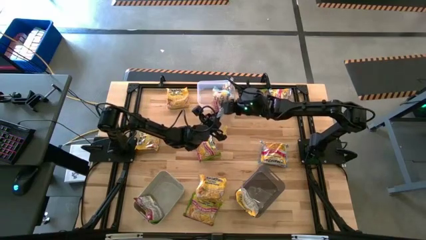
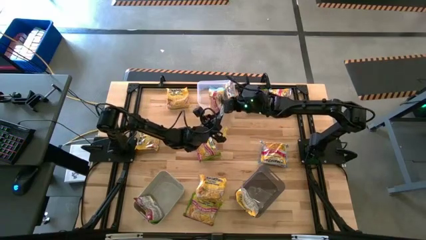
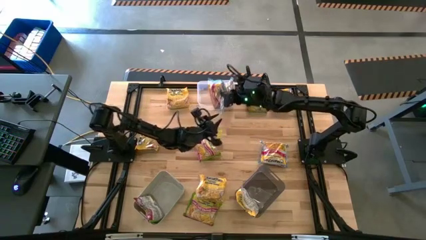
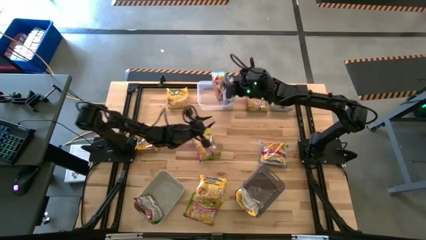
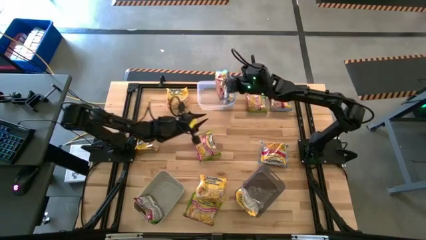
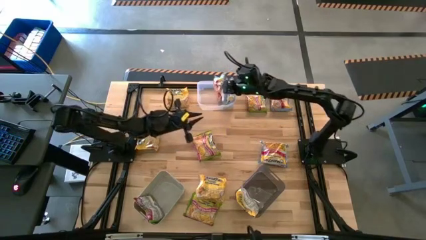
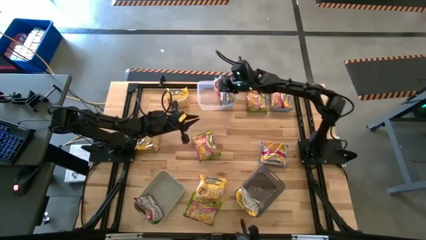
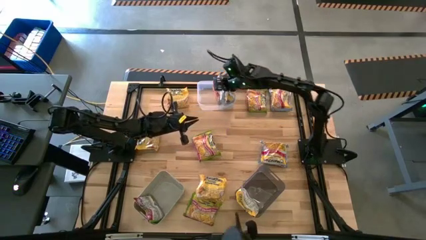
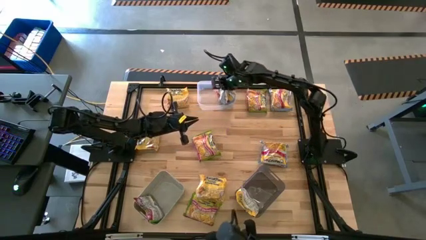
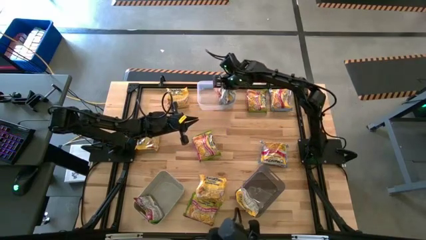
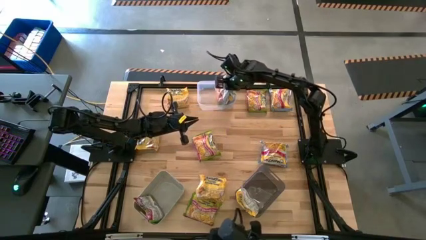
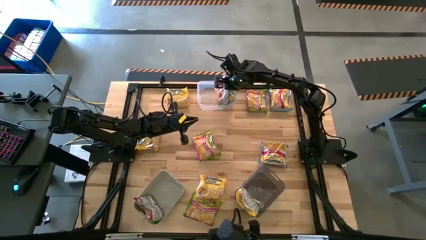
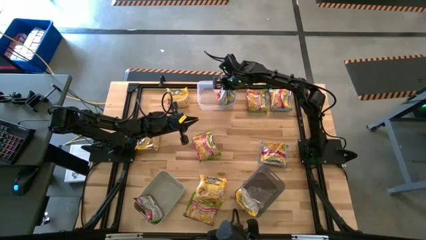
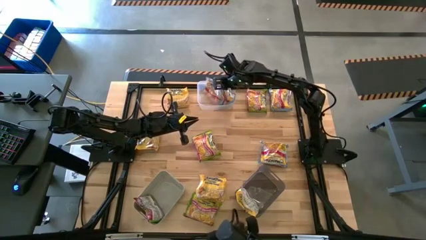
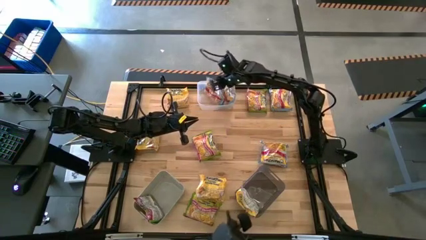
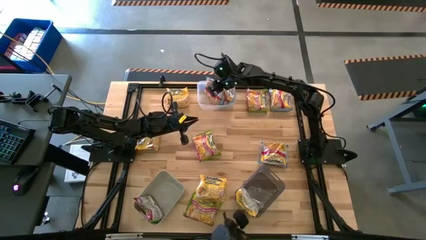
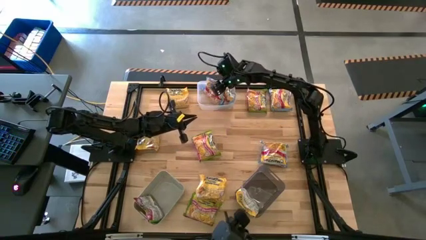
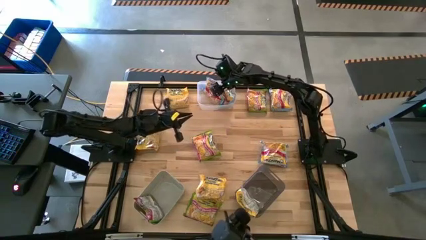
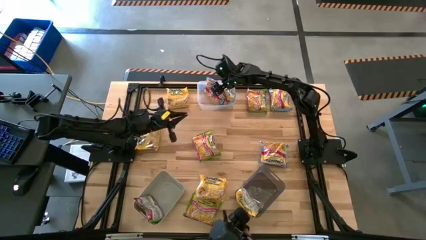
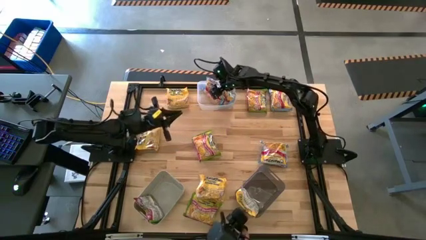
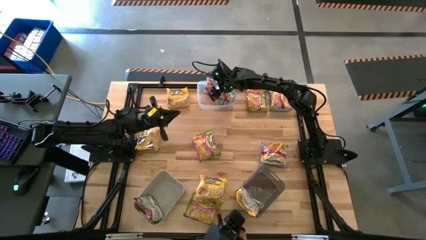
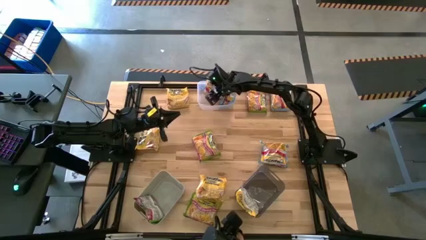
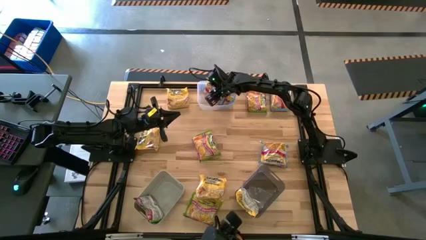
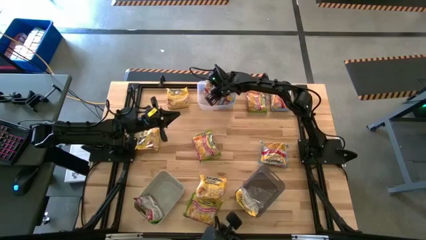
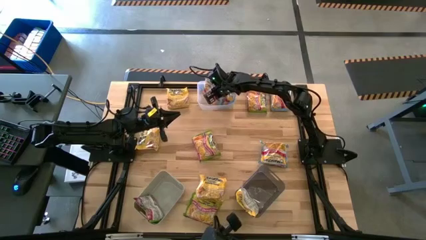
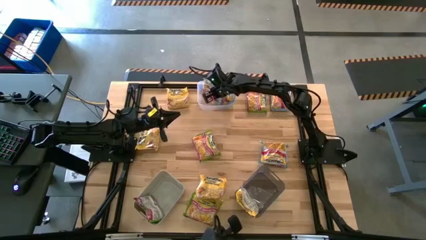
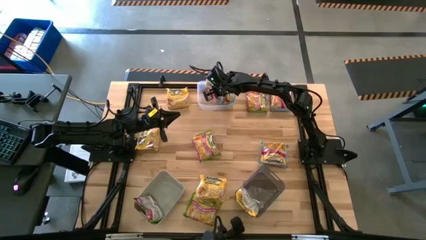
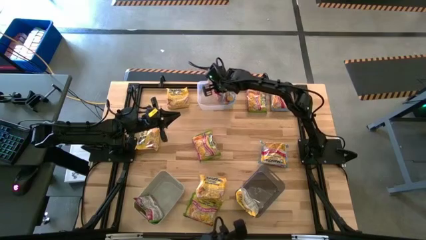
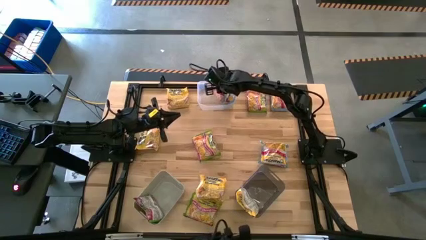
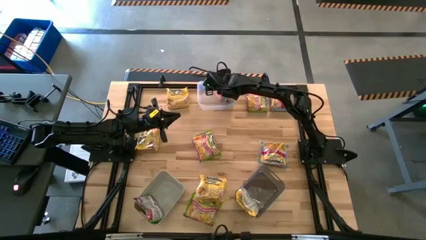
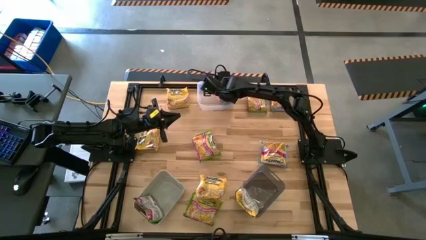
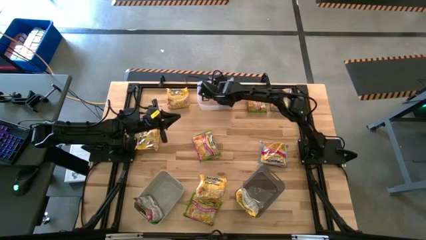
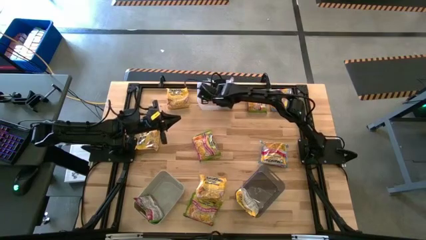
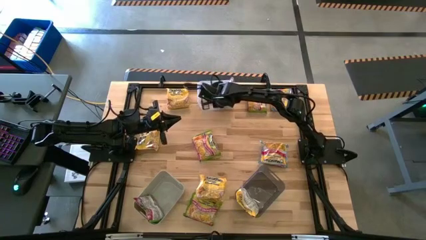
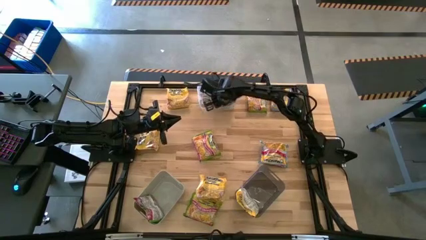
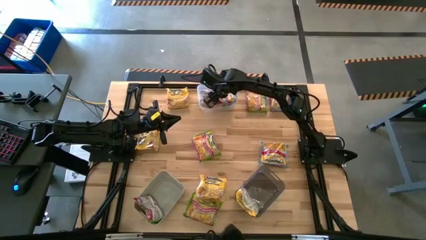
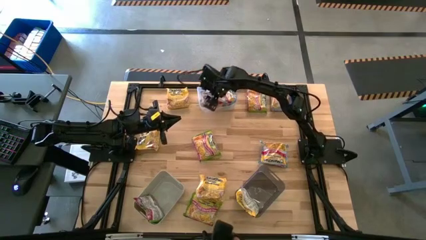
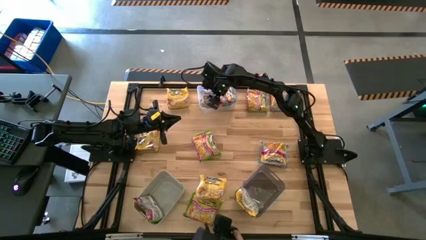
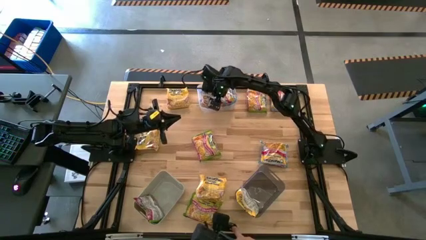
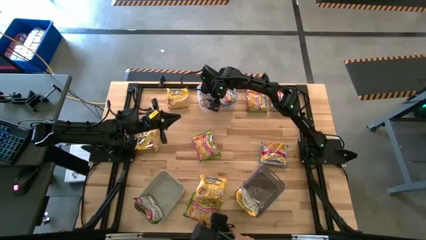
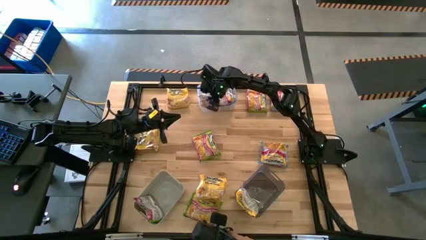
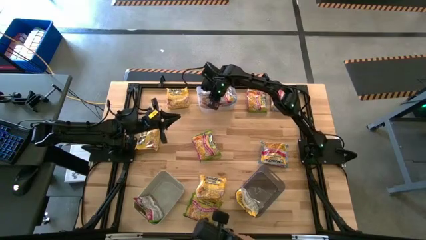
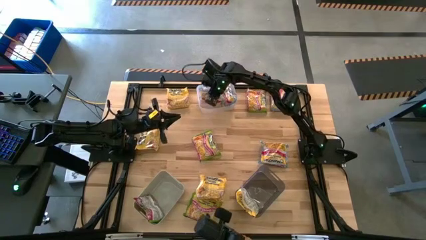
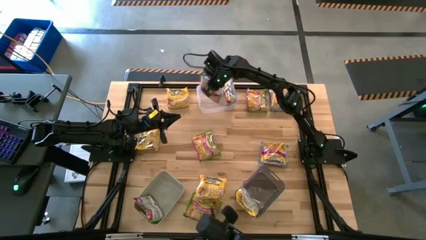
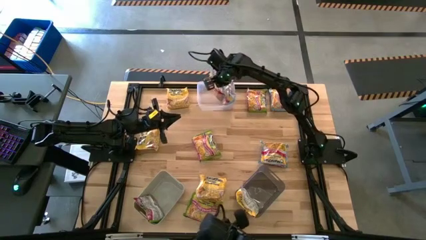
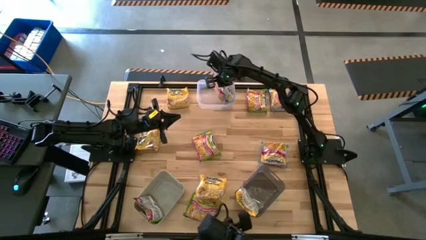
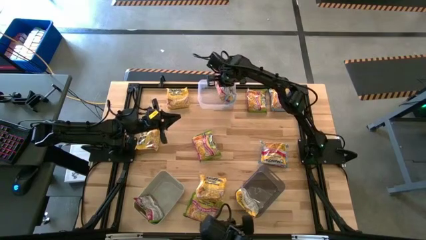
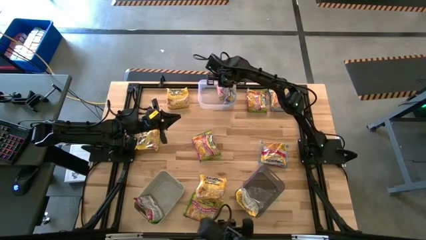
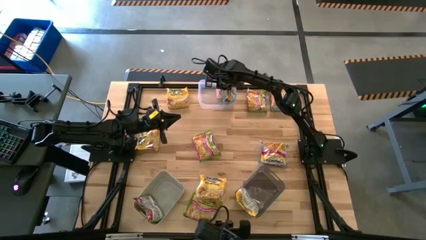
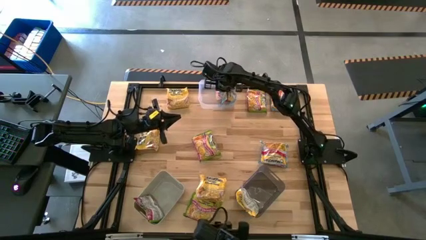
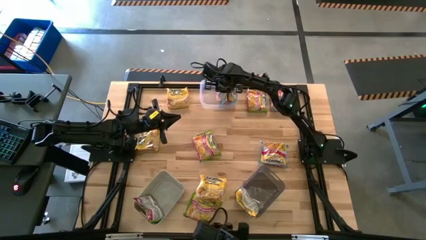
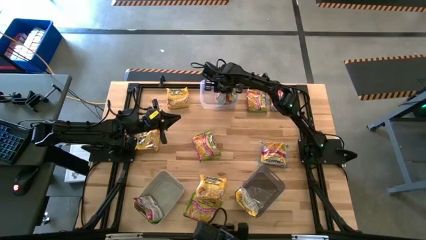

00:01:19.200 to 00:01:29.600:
Task: Sort Maruchan noodles
Put the light blue noodle pack into the transparent bin

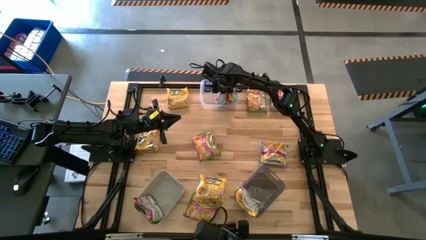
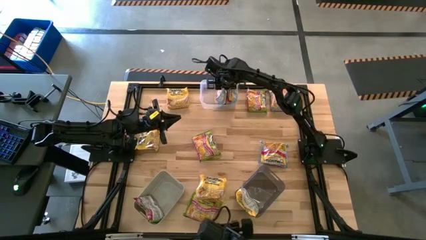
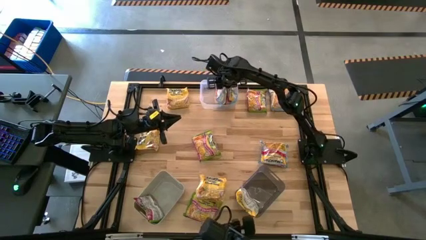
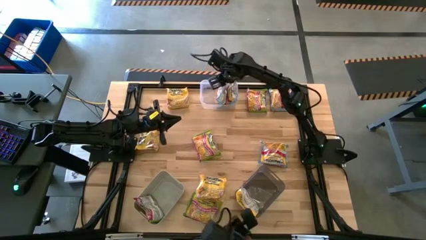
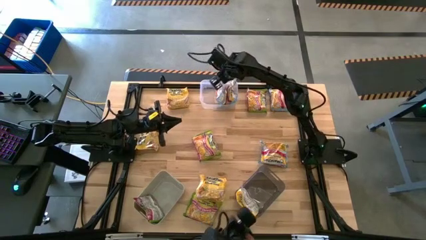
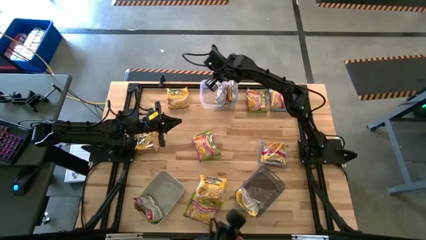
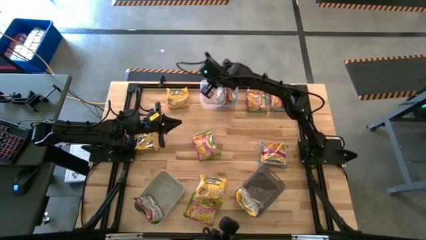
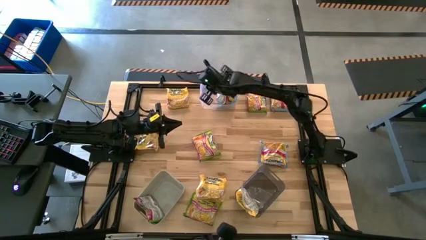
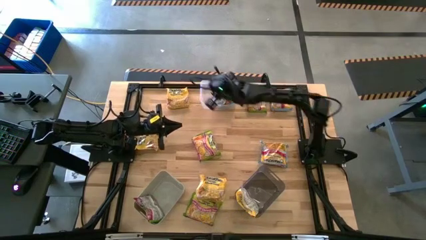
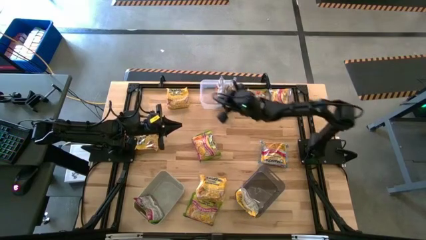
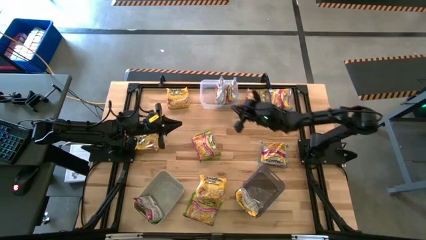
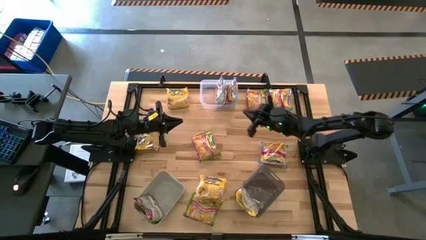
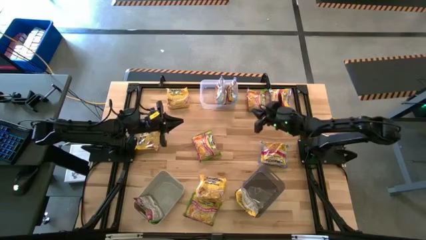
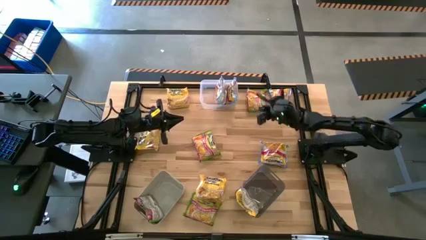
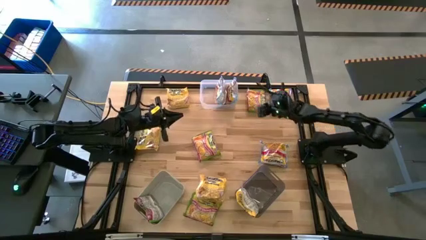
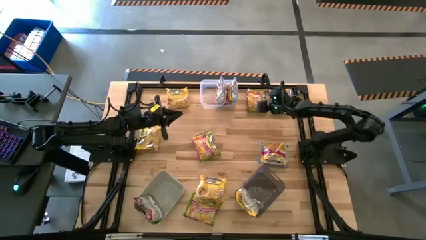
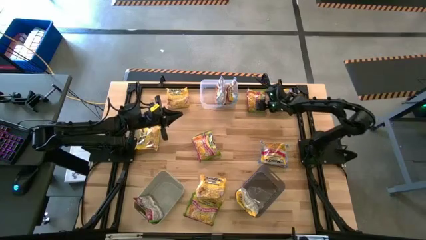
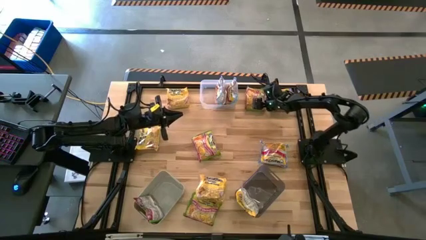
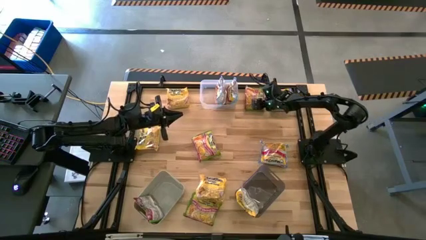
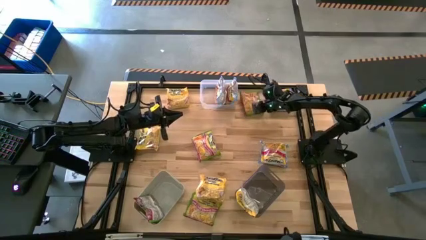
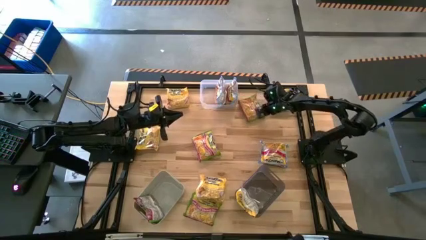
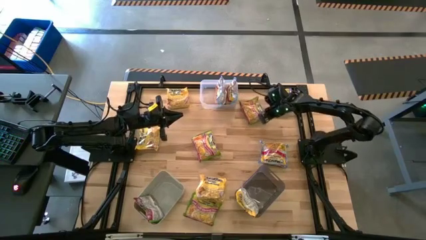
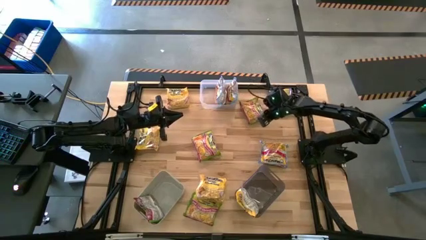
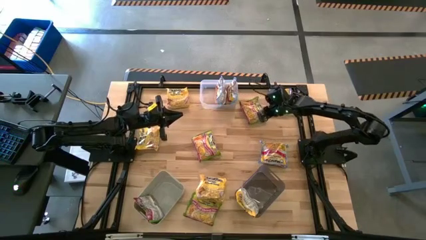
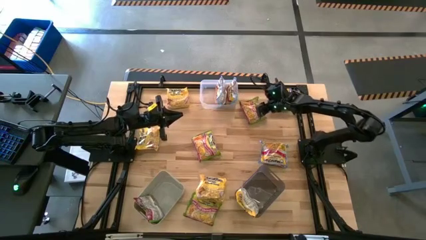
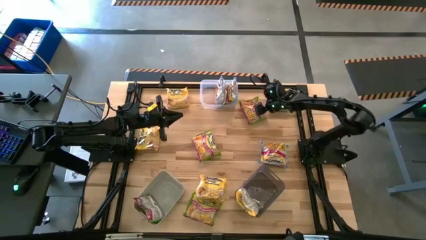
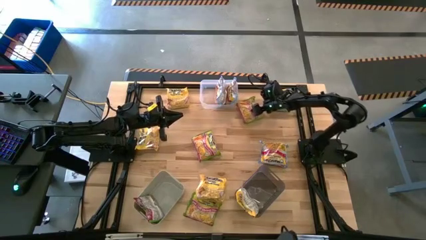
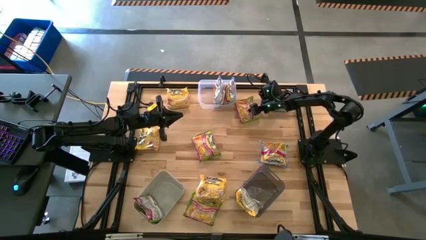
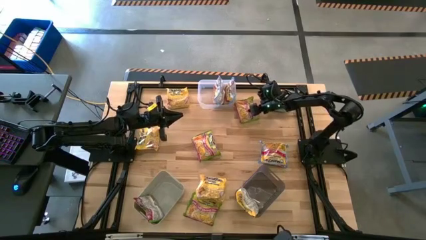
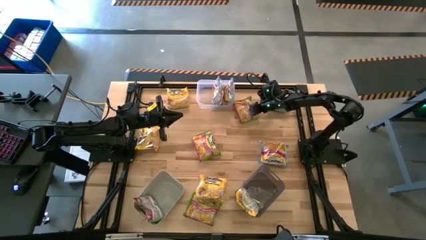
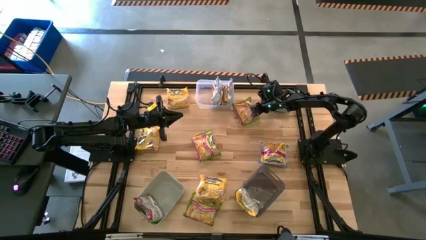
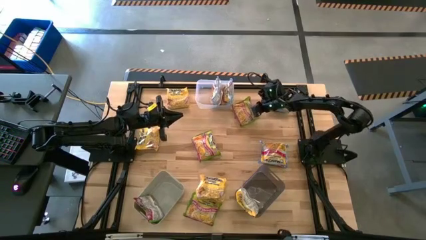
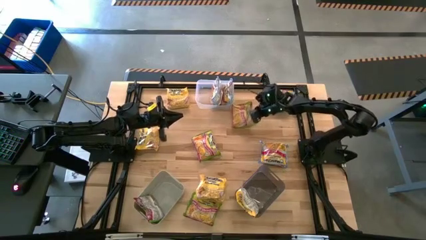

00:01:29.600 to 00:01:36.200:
Put the green noodle pack into the gray bin
